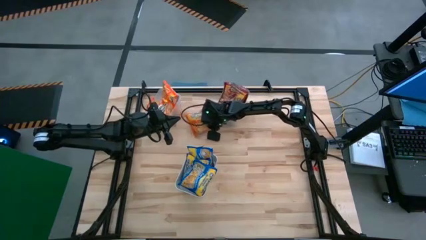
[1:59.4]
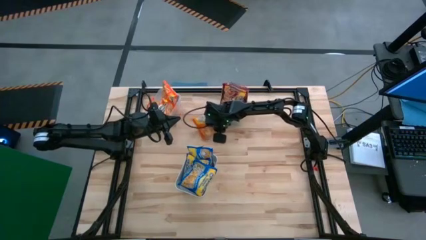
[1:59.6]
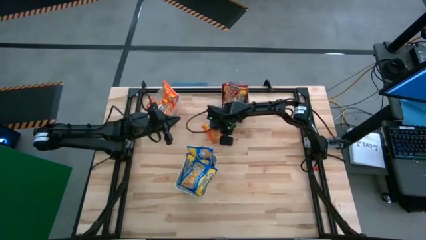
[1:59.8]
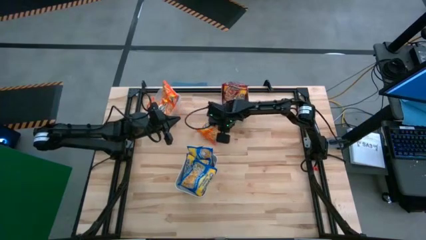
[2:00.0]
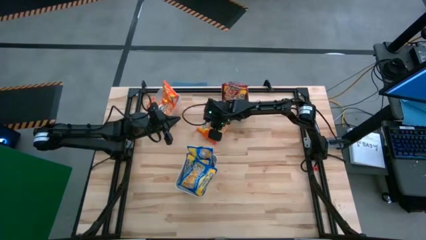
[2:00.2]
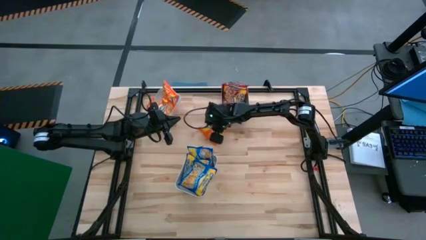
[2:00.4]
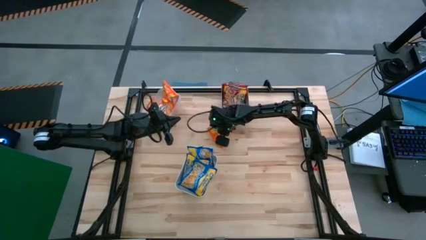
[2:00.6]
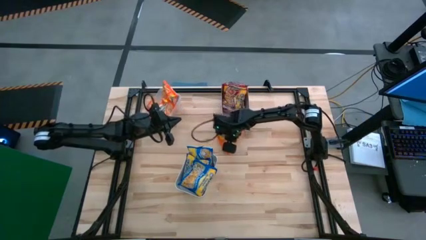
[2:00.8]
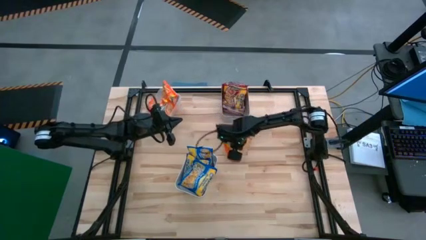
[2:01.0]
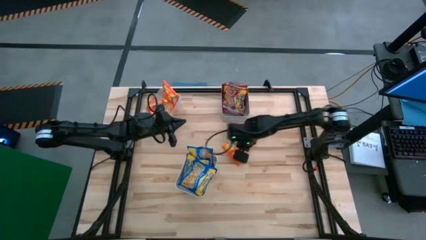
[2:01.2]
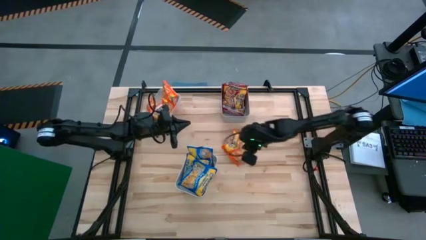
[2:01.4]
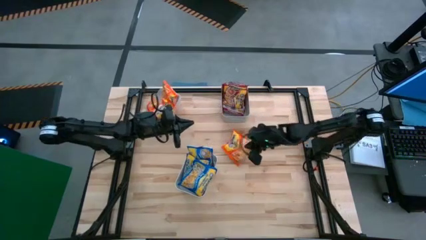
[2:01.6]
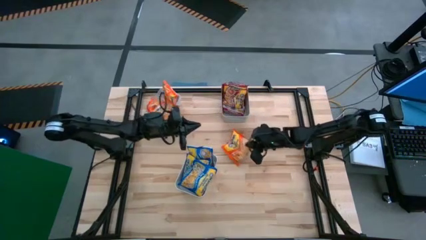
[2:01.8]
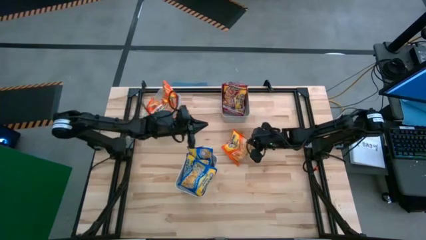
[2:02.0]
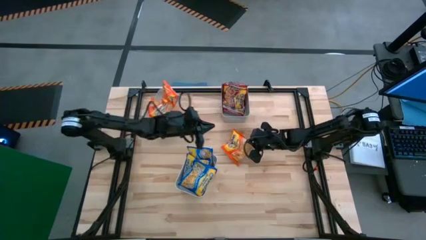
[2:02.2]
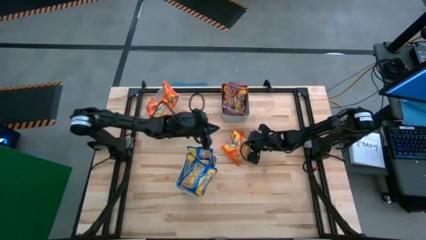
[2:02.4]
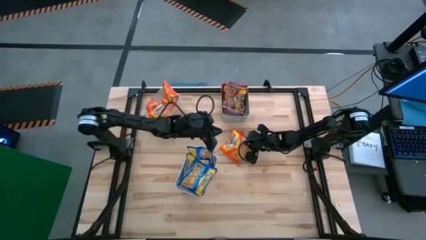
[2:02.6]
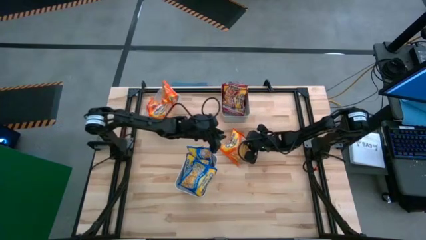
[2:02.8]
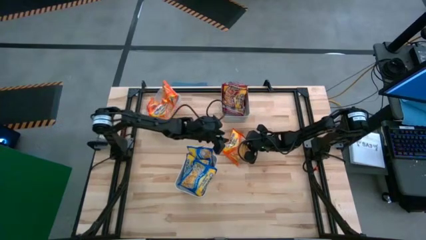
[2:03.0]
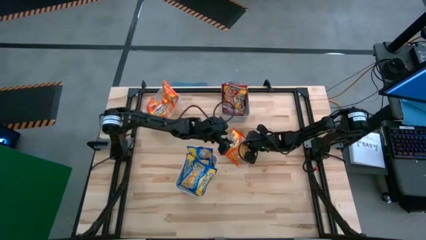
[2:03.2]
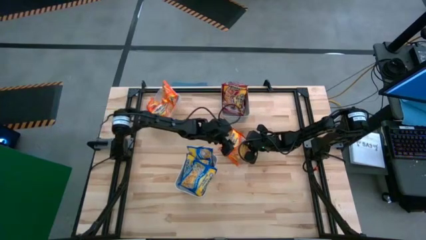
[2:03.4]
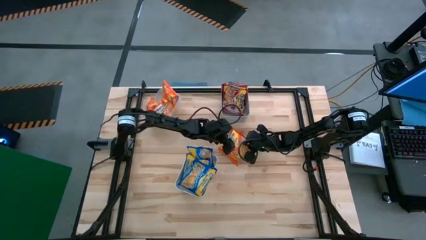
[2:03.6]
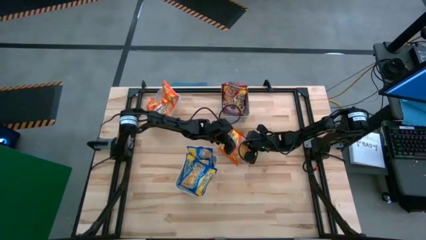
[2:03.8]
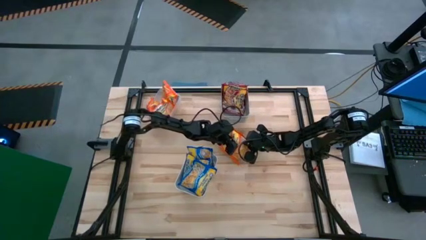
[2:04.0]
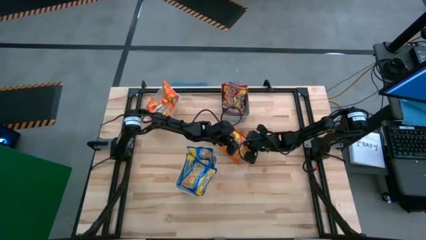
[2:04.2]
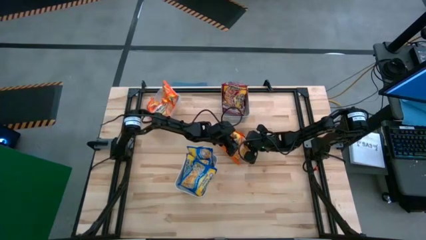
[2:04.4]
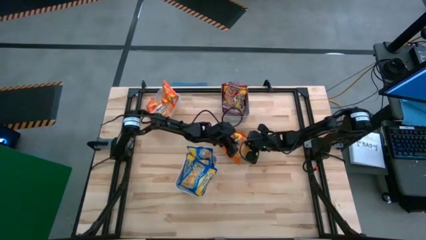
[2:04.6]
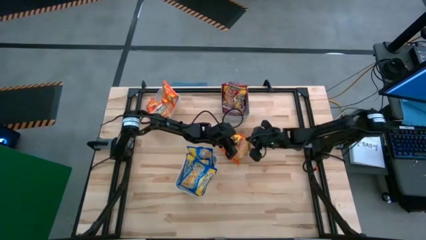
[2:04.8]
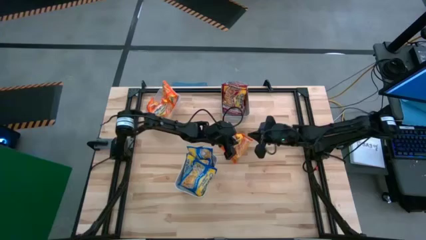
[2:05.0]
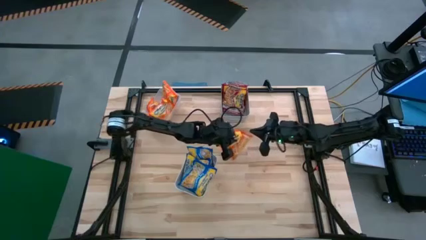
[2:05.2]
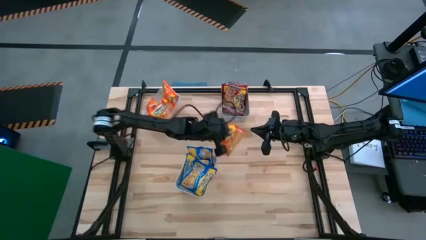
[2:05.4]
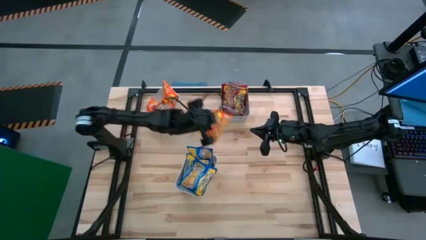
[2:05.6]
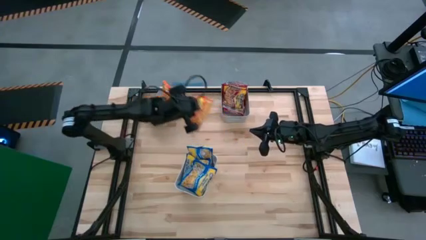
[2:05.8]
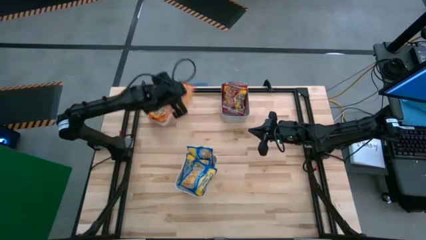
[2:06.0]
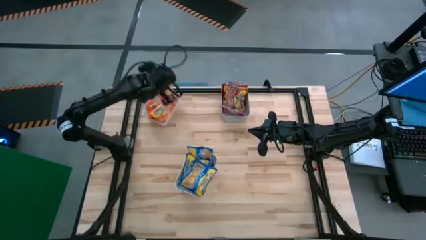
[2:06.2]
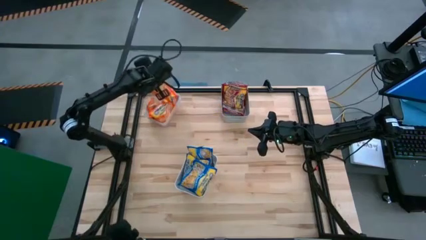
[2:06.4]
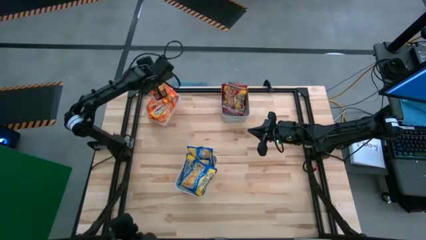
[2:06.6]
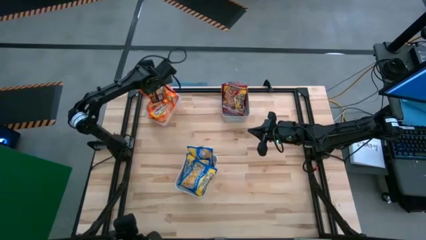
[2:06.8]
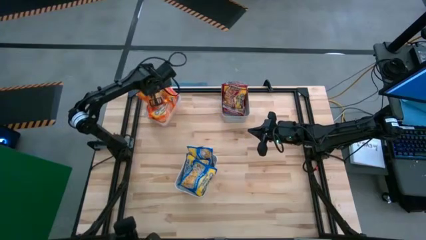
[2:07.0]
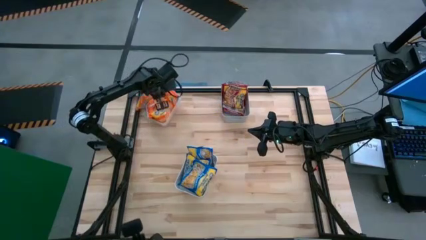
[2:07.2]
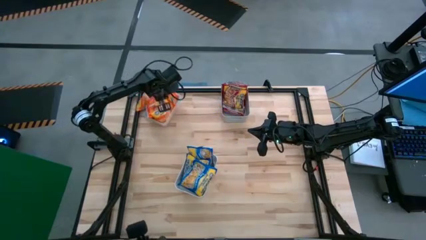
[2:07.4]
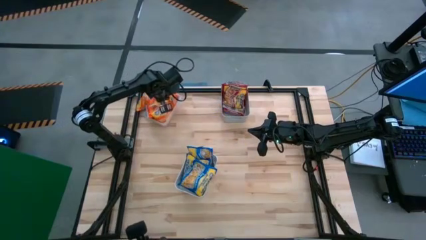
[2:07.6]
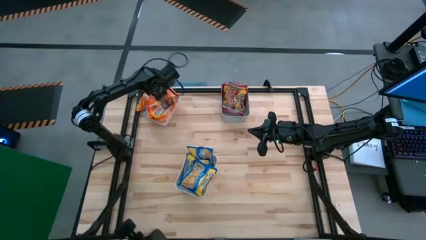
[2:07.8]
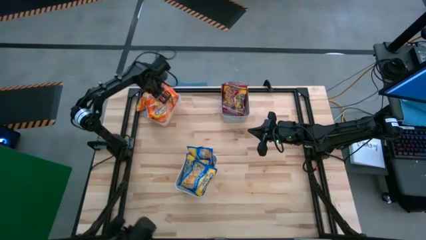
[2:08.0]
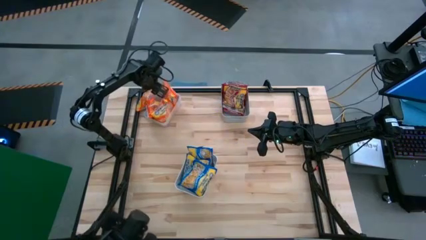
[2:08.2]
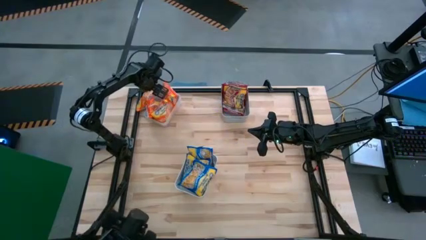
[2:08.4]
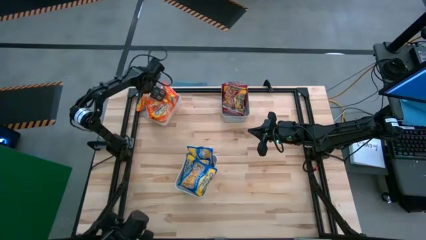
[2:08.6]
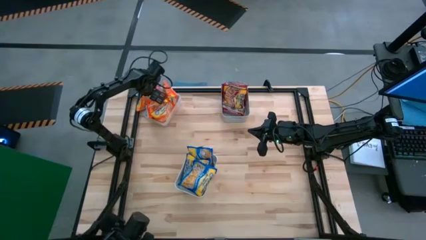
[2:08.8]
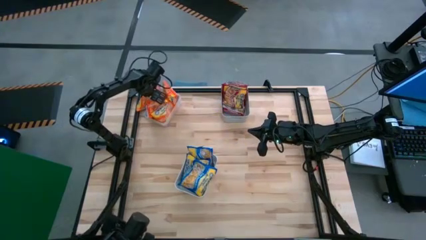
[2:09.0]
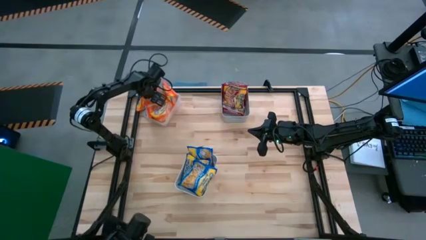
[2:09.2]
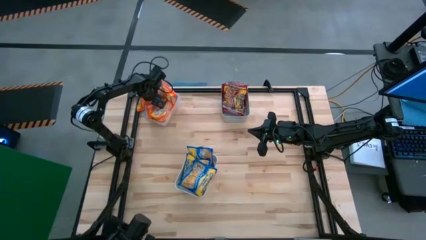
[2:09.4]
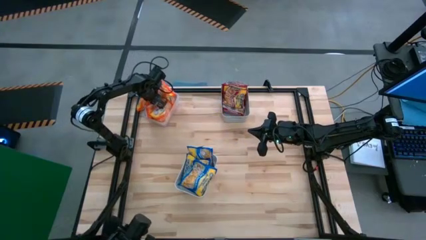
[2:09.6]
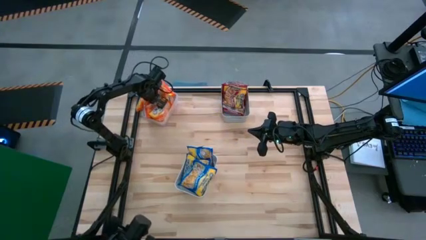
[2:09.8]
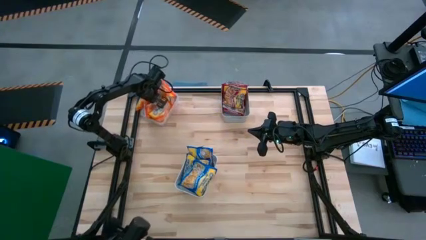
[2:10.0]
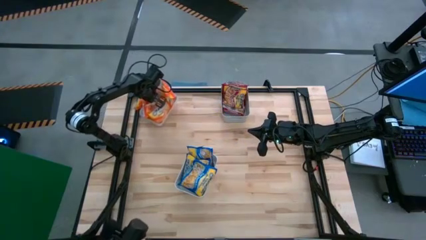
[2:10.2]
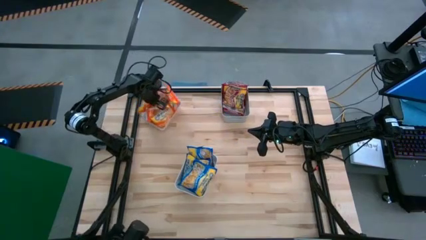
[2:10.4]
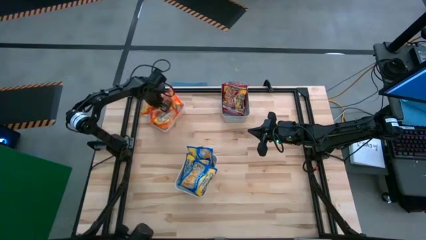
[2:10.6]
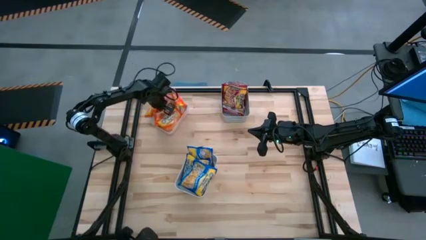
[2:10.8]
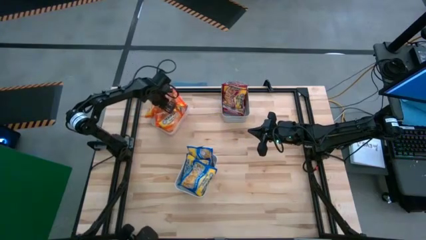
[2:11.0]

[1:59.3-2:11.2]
Task: Sort Maruchan noodles
Put the orange noodle pack into the transparent bin
